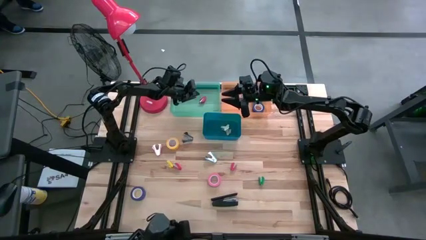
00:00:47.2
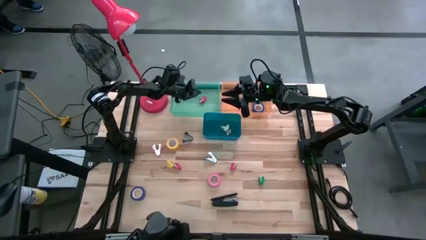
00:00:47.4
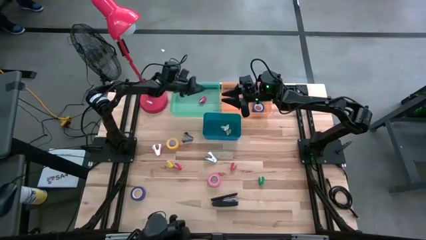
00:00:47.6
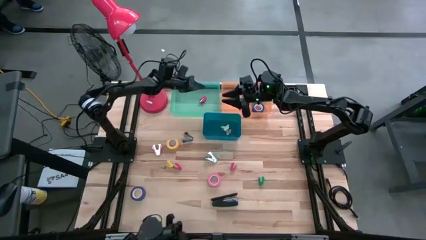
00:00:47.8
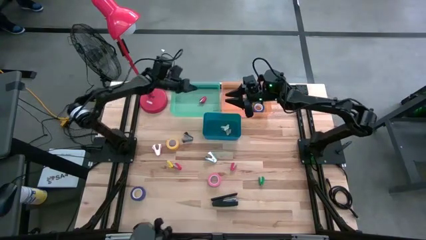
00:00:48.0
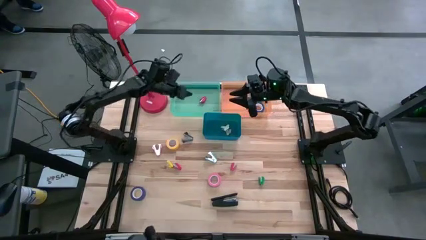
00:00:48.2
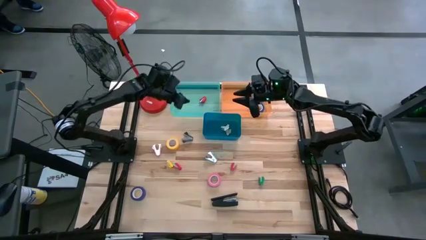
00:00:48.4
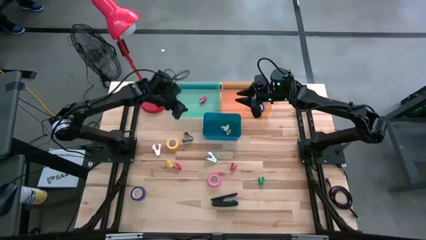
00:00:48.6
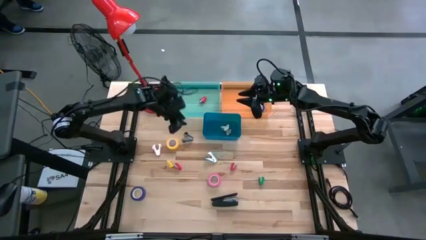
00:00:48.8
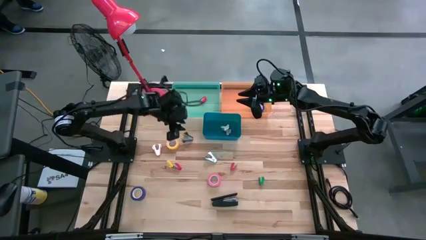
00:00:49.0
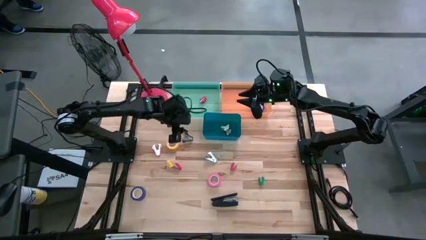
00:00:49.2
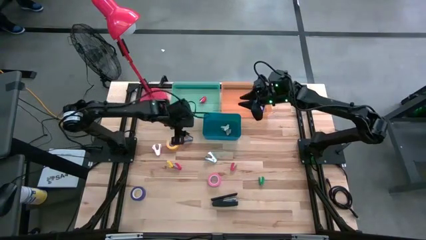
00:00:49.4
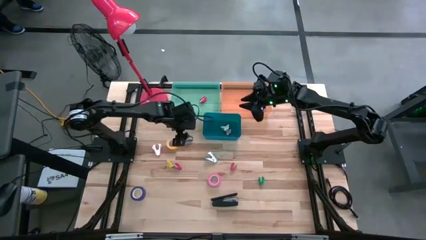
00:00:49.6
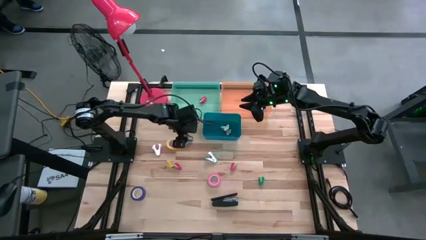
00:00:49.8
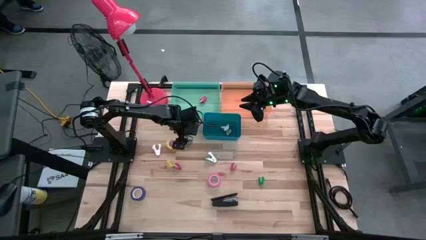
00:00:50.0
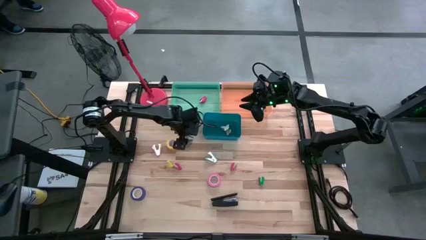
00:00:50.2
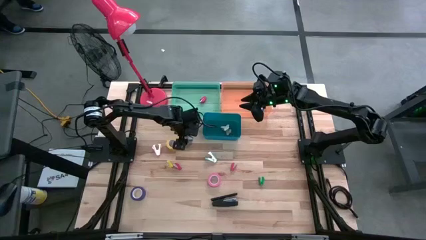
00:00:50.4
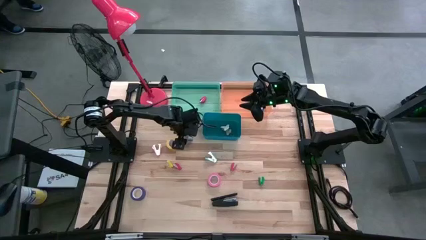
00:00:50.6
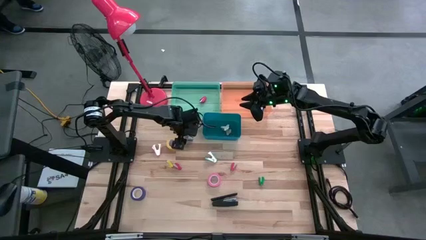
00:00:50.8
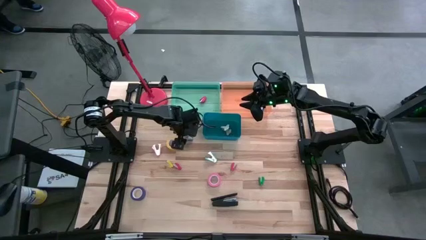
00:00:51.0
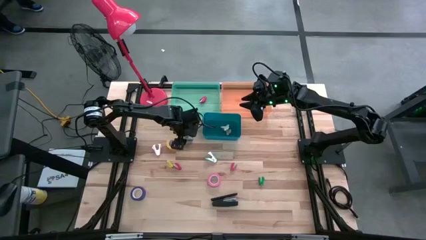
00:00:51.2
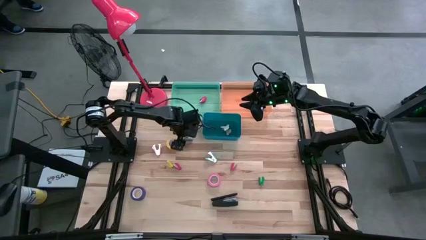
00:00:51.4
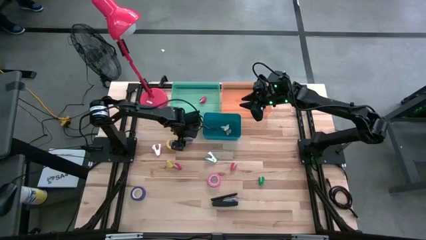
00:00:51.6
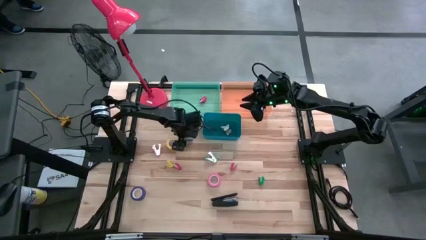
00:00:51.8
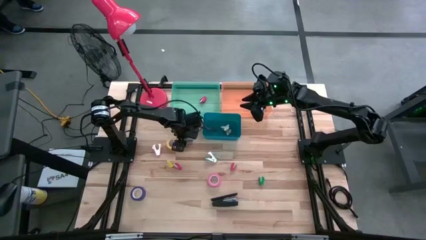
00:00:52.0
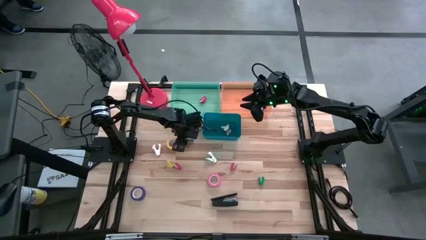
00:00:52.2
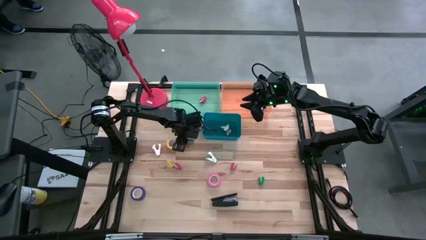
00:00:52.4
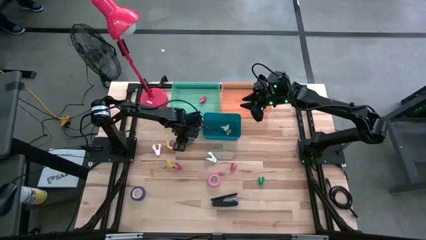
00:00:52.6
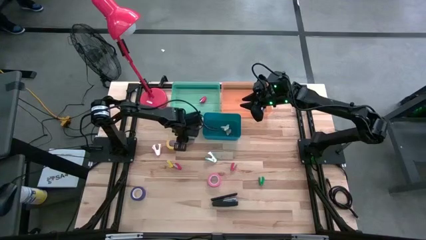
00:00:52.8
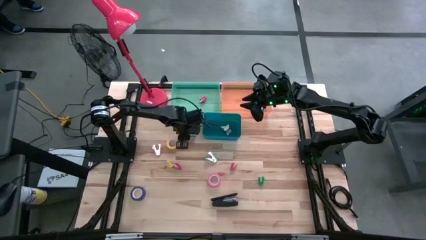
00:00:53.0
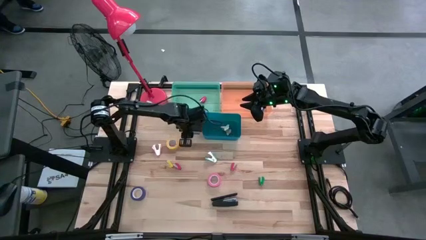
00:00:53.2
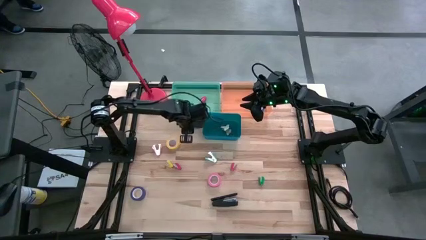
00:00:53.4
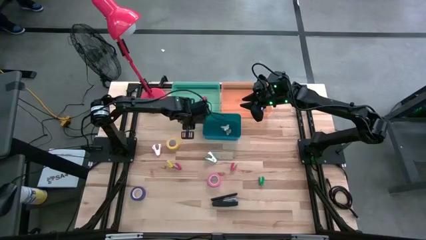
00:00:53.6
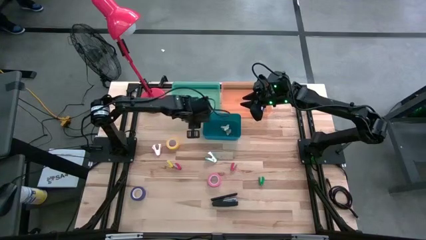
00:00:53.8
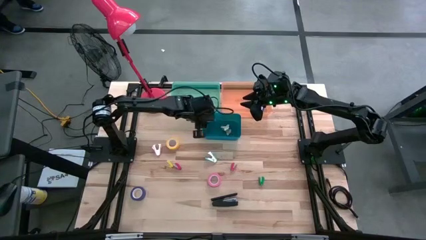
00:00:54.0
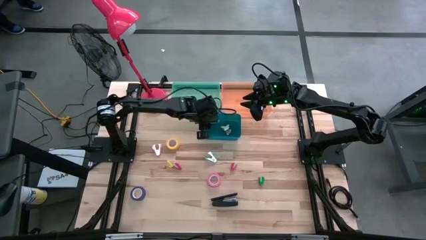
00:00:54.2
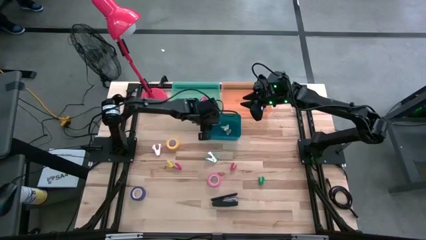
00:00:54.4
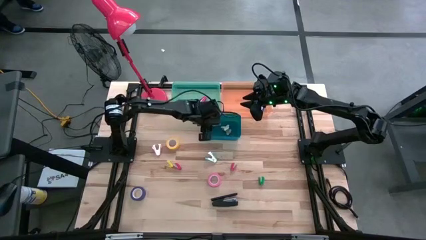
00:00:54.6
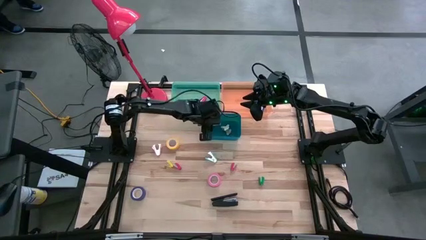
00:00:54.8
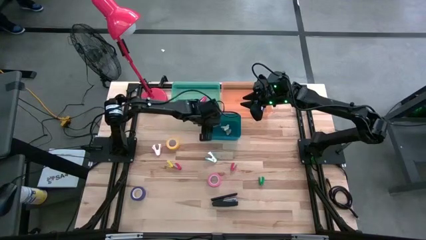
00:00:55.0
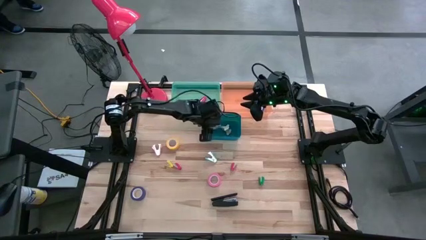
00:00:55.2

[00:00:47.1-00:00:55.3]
Task: Pick and place Stapler, Stapler remover, tape
Put the black staple remover into the blue bin

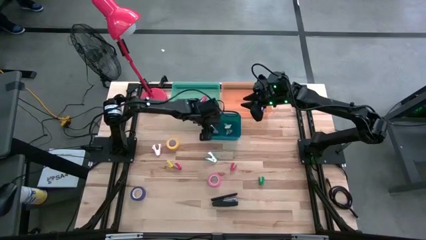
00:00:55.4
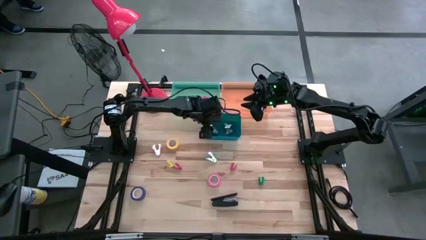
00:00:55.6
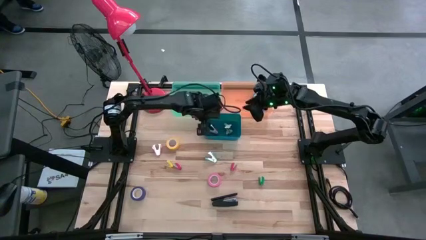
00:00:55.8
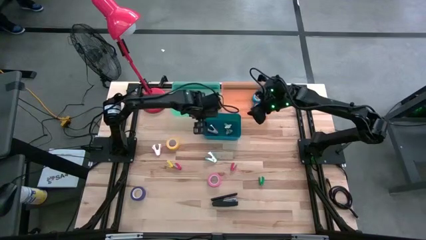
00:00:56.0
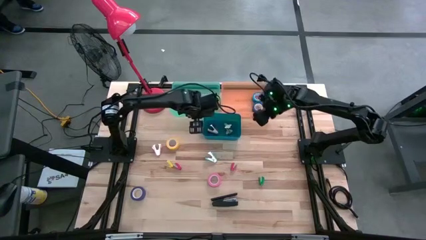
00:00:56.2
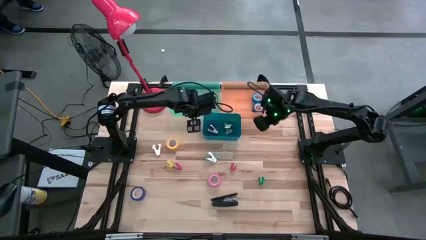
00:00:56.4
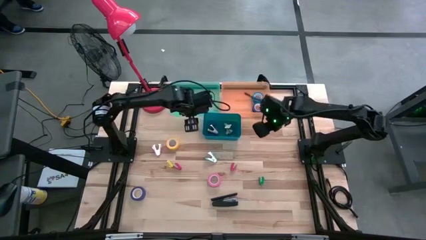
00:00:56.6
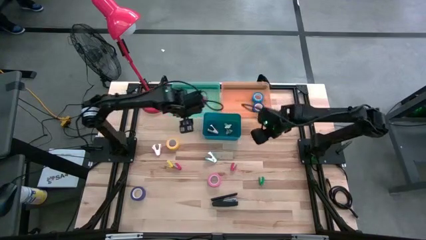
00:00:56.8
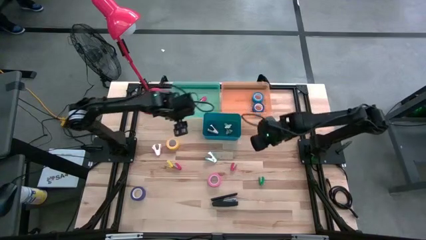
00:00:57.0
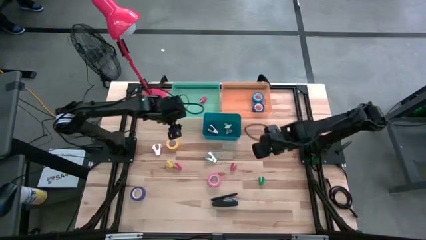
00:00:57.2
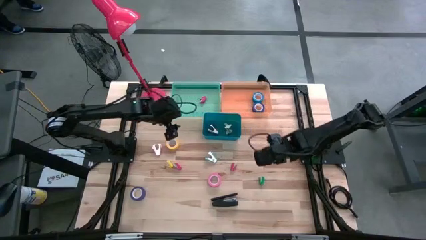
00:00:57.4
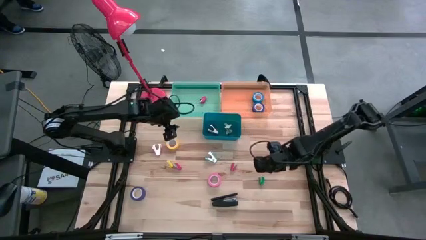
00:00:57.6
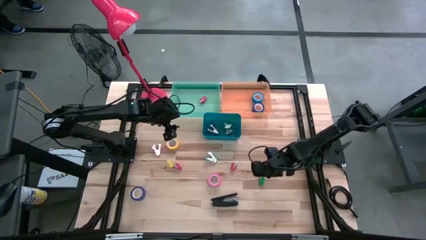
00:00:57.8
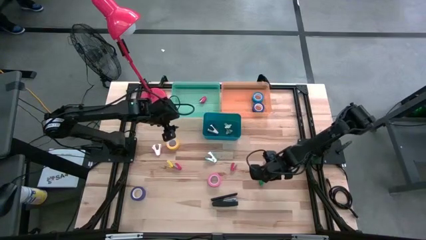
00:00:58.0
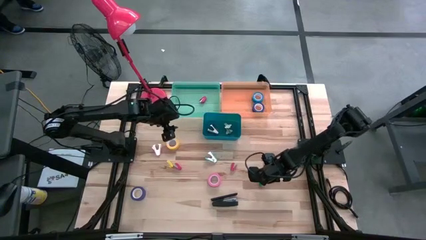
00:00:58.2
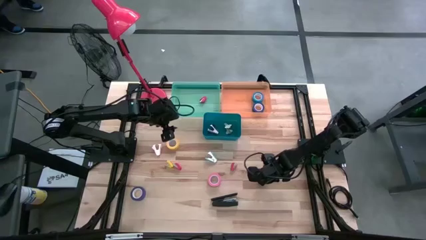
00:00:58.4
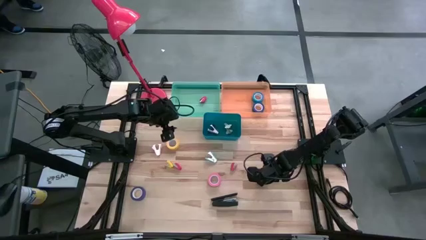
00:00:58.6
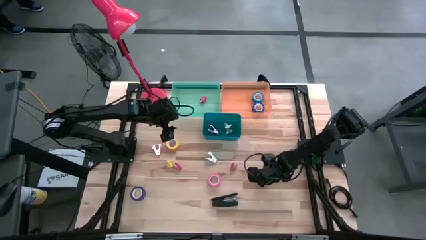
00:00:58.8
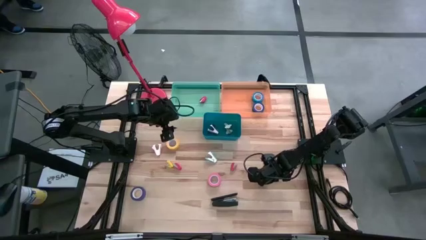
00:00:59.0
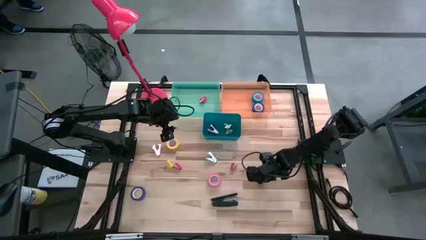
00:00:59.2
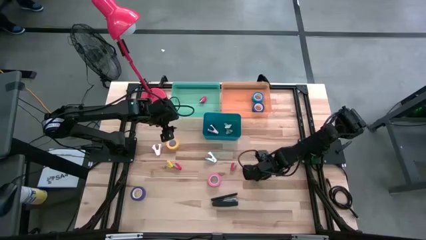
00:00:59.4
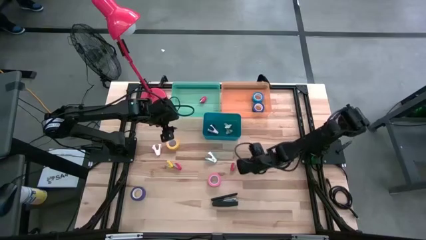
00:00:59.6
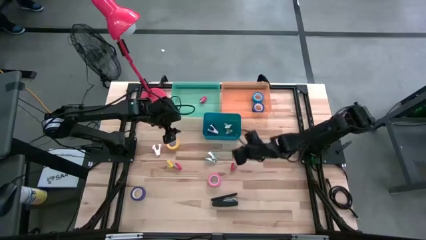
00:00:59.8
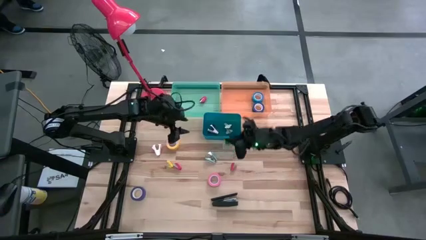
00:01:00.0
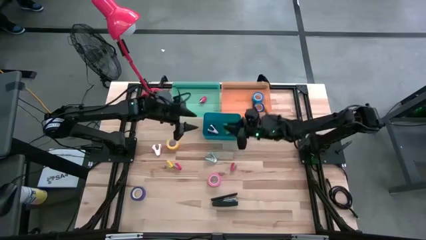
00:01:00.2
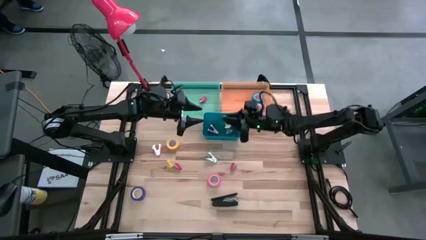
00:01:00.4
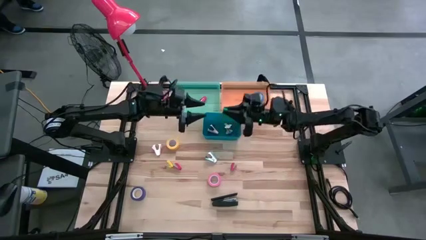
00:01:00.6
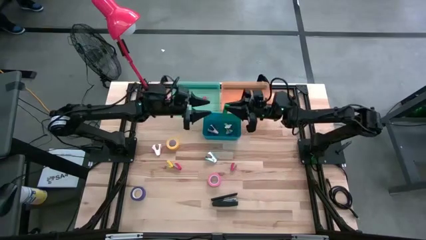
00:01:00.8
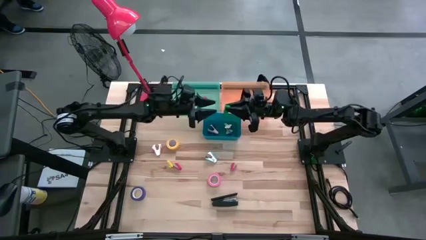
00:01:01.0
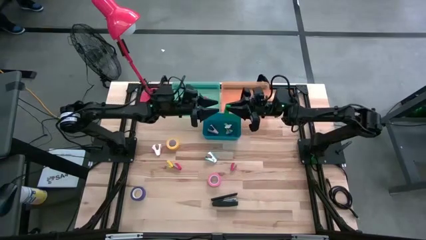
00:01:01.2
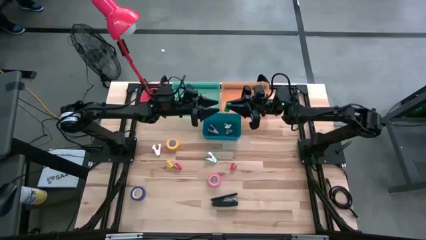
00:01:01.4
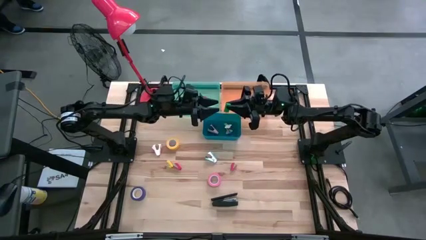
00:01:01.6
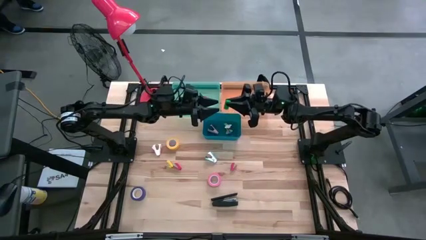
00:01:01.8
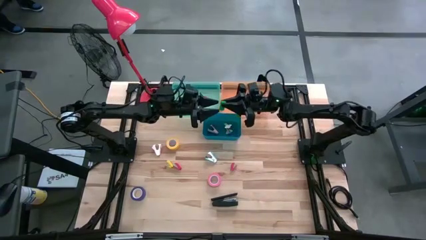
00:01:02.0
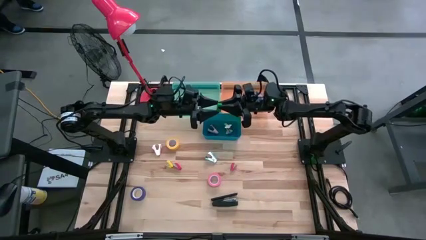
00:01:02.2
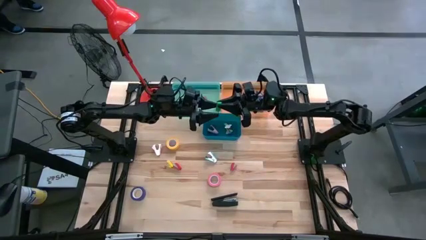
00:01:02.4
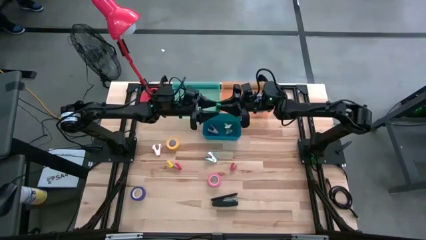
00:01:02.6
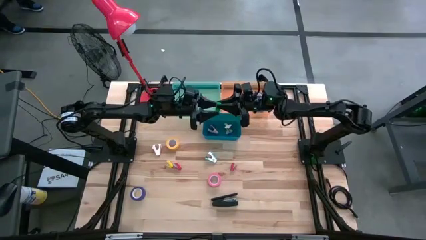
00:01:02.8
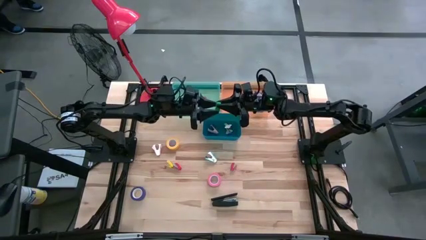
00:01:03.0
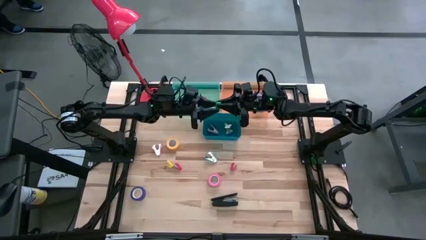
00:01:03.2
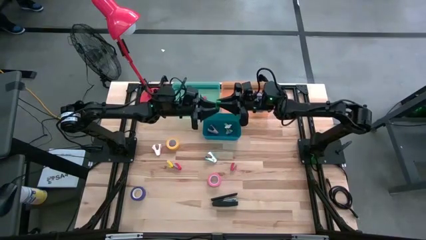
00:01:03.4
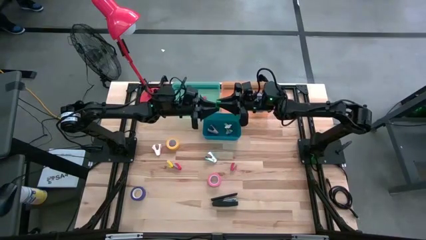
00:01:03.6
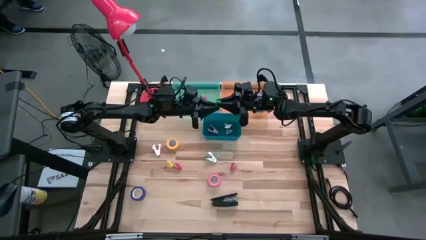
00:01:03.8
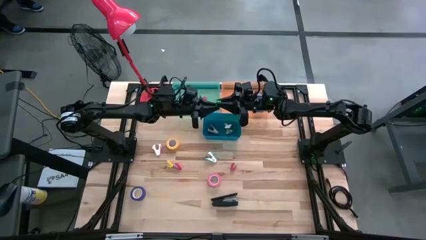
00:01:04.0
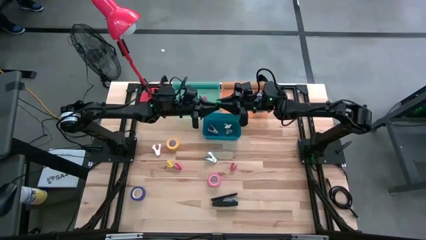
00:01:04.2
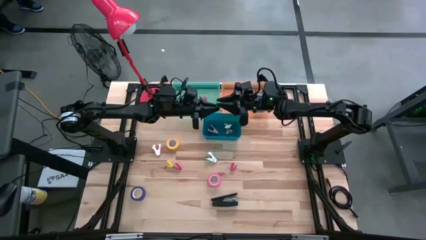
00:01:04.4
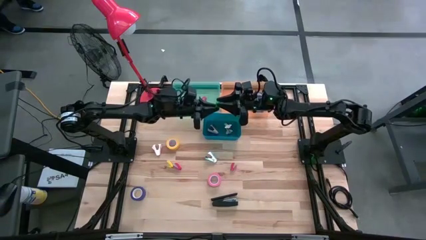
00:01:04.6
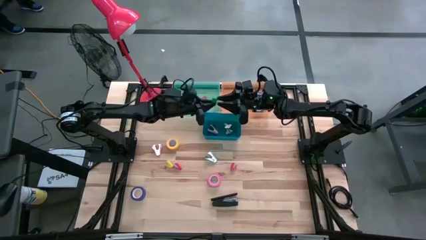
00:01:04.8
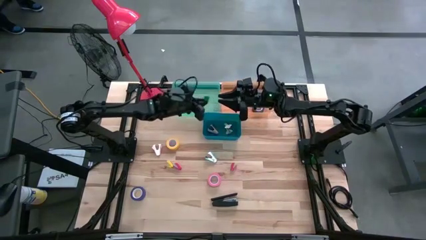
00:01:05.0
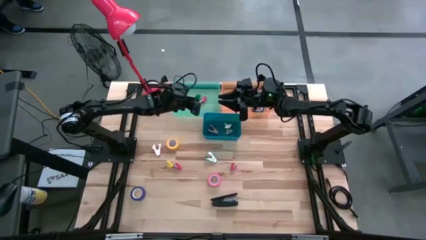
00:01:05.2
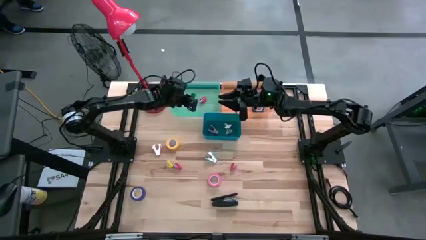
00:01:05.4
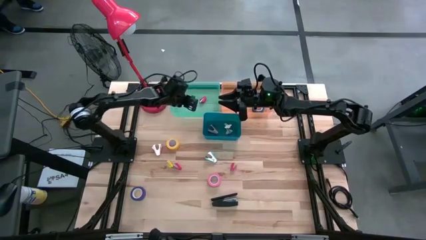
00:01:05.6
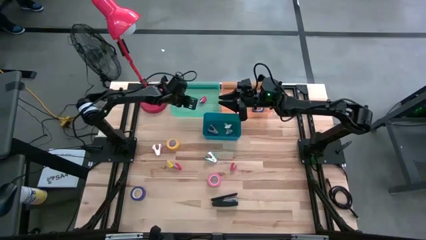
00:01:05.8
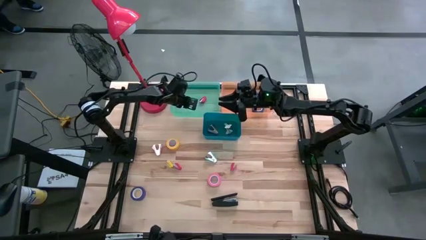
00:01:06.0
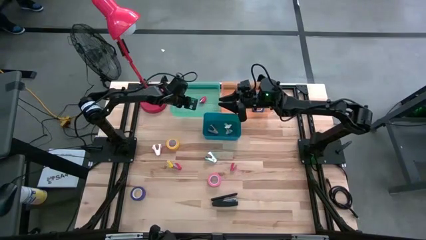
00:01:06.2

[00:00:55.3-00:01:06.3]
Put the green stapler into the green bin
